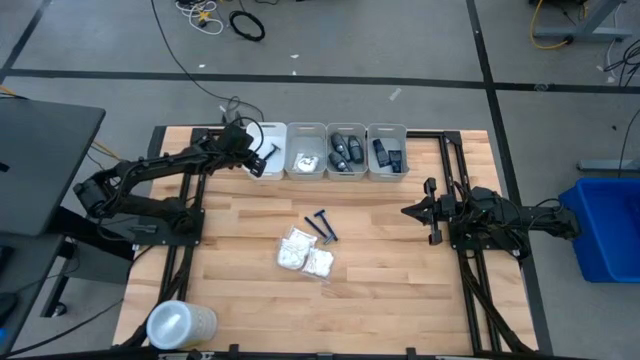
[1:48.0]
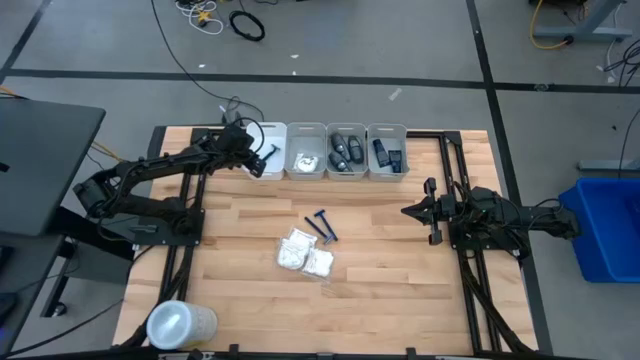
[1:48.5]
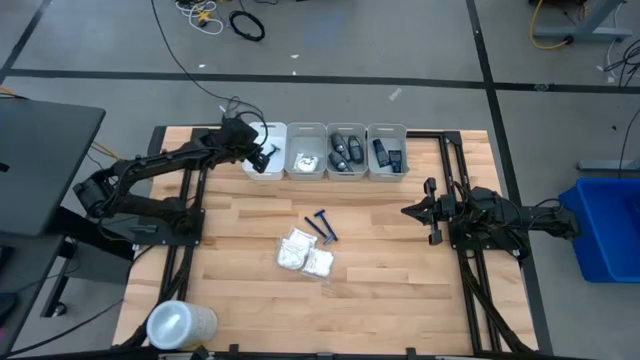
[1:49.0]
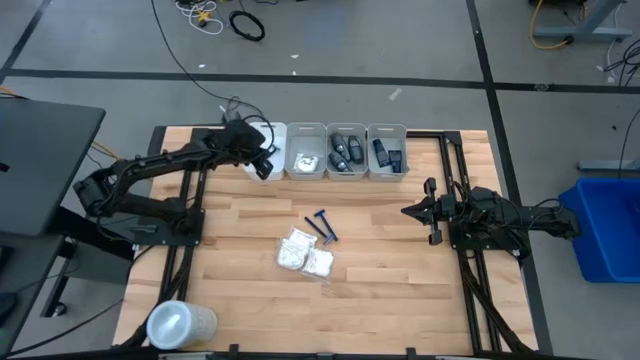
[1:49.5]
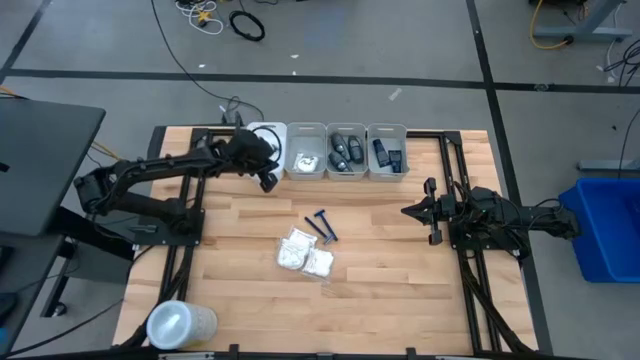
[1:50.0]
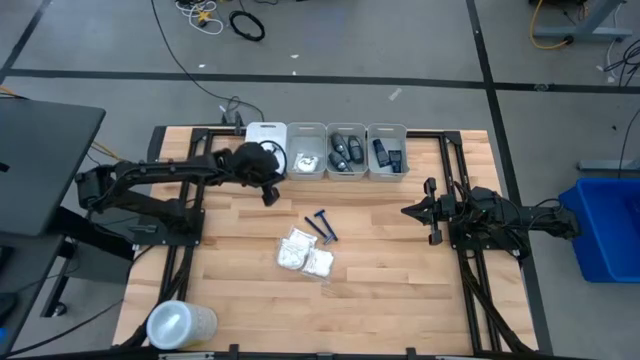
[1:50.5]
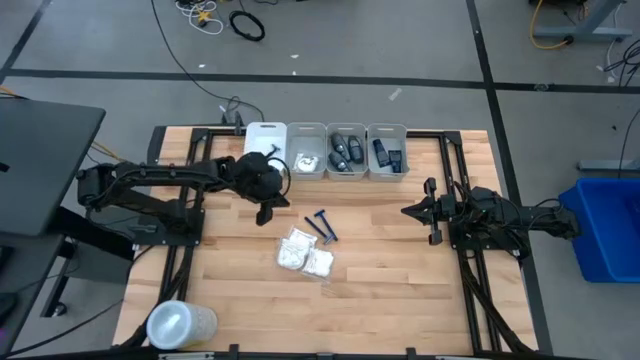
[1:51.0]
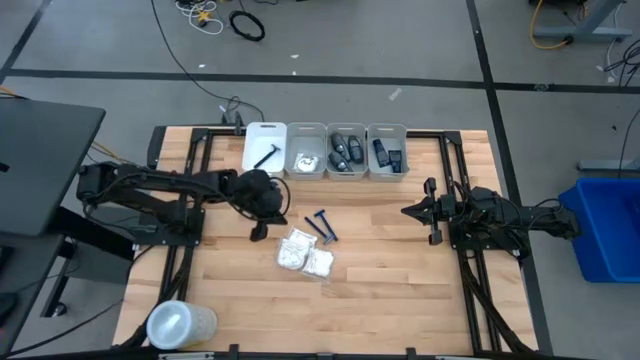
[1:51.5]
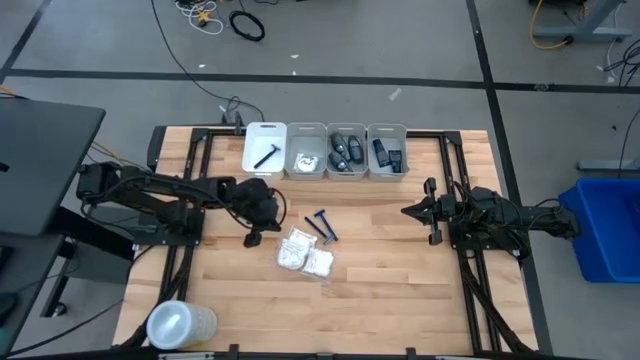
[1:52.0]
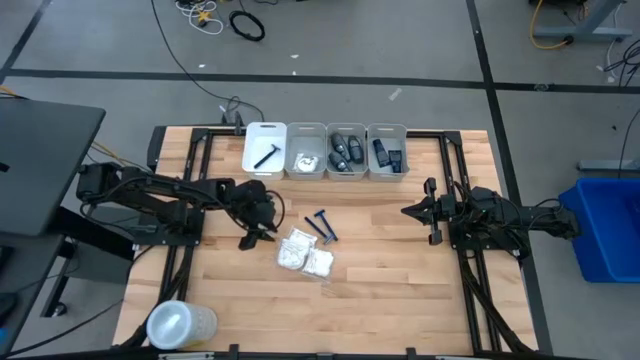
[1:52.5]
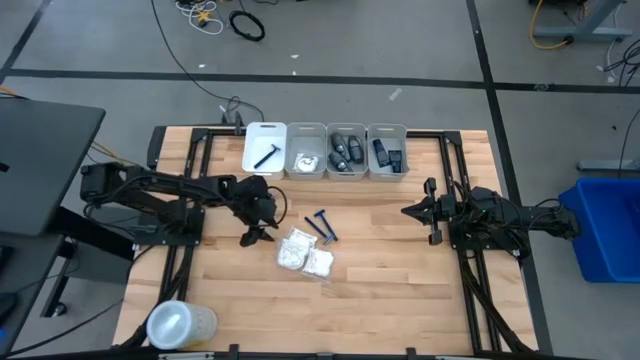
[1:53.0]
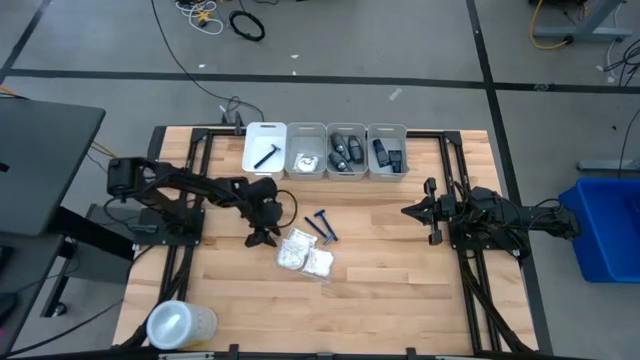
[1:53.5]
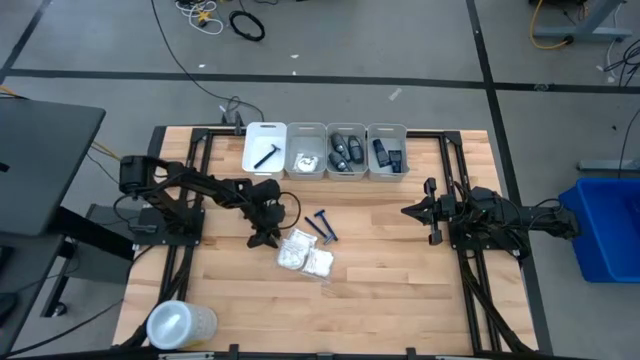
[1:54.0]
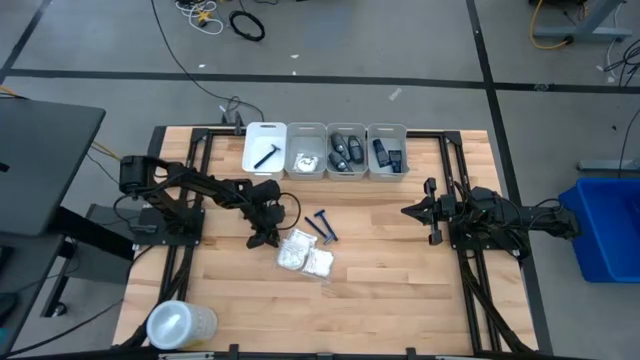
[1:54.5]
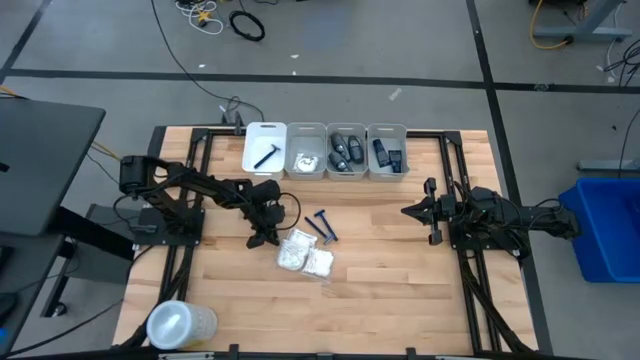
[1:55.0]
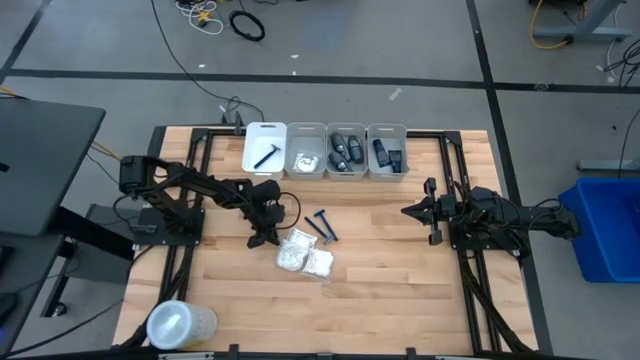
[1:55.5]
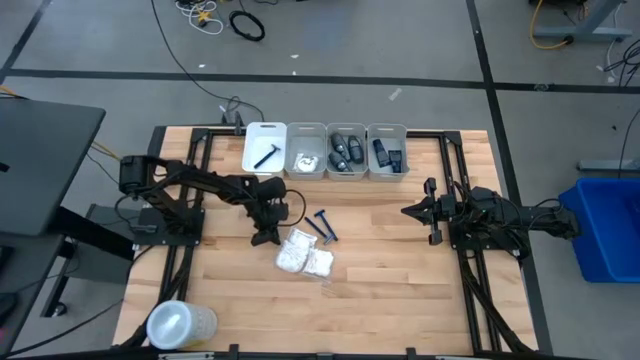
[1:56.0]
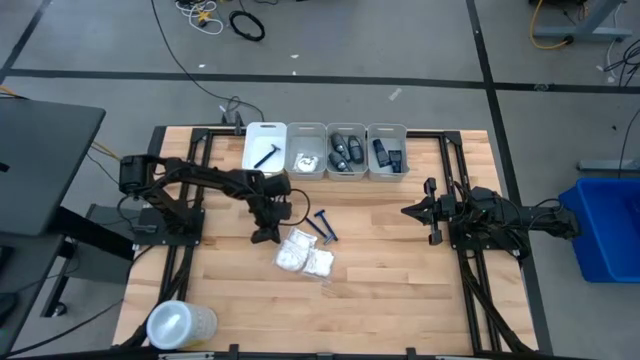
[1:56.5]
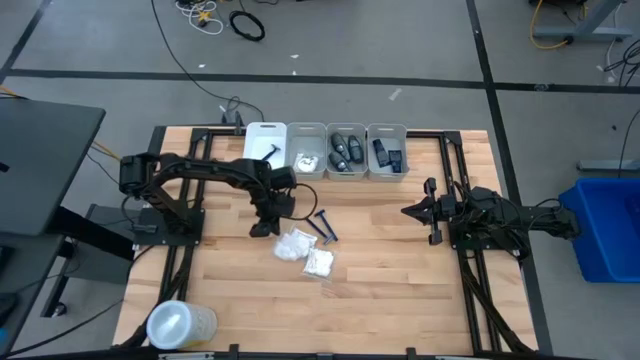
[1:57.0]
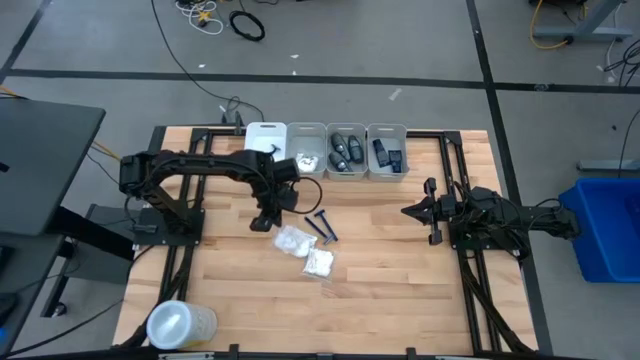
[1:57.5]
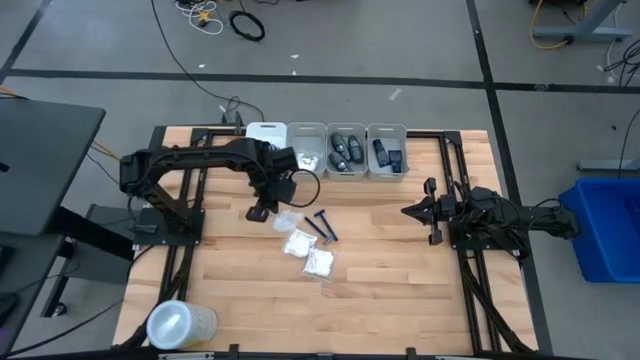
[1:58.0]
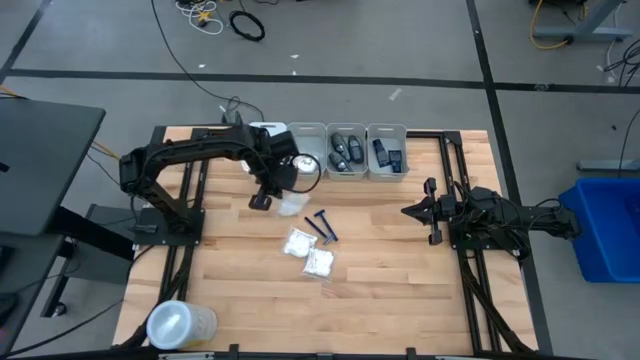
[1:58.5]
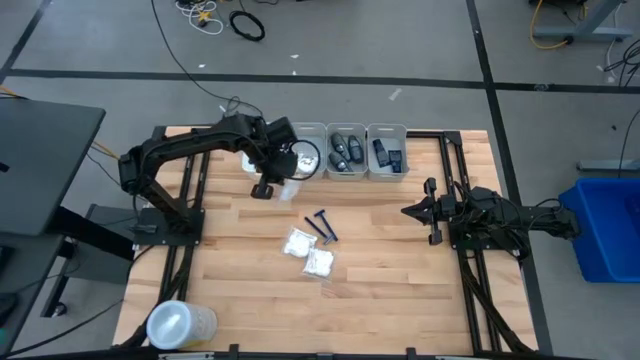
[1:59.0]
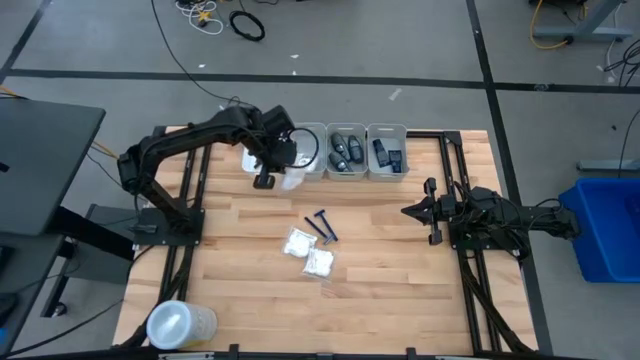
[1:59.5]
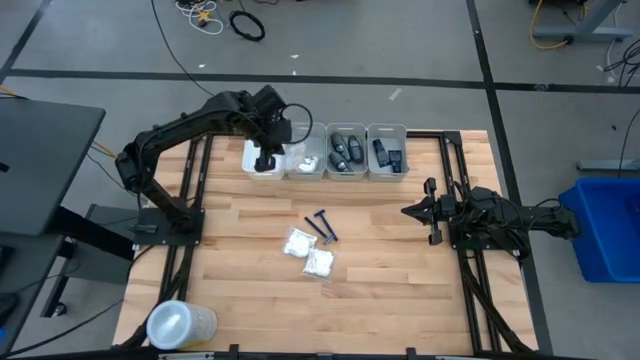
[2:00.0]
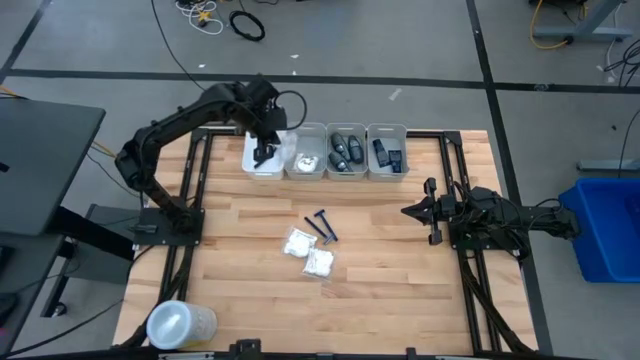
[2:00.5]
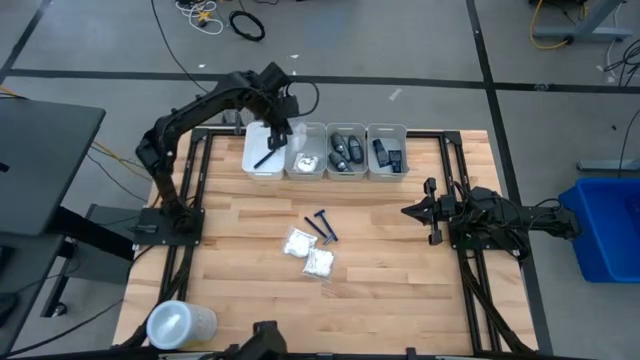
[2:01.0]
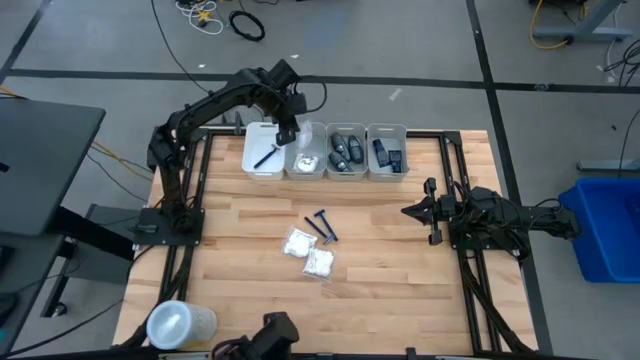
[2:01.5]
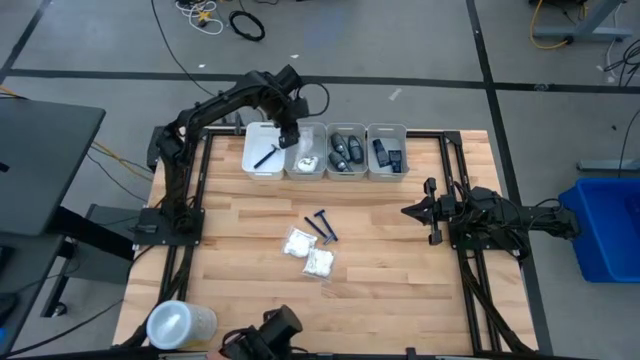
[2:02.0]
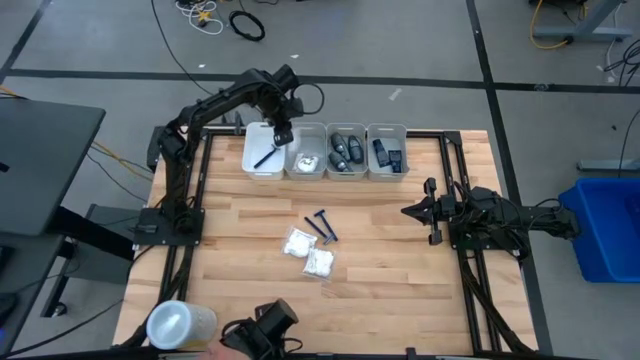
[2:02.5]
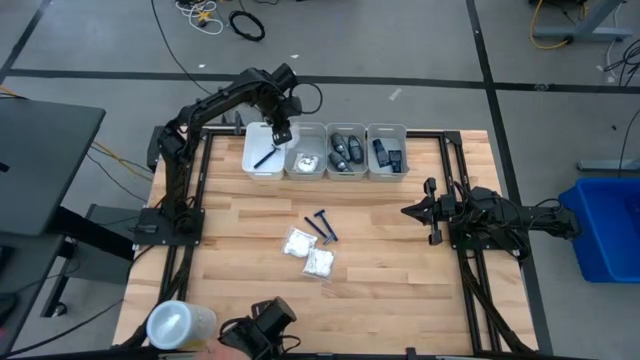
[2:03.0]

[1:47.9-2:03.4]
Task: Pick & Place Travel size toiletries
Put the white cotton pack into the left gray bin

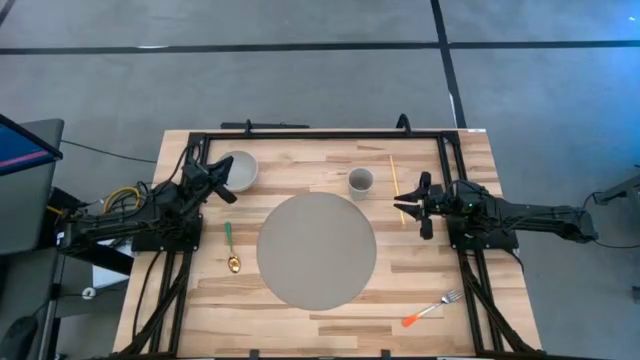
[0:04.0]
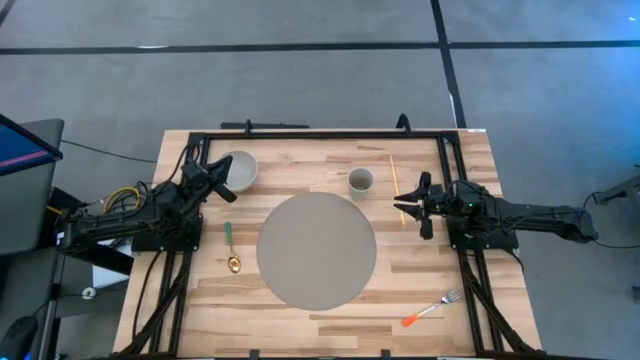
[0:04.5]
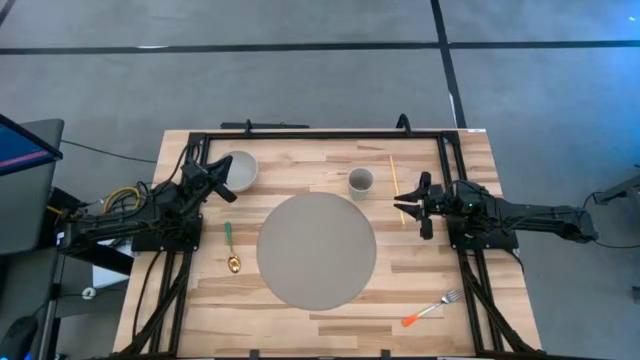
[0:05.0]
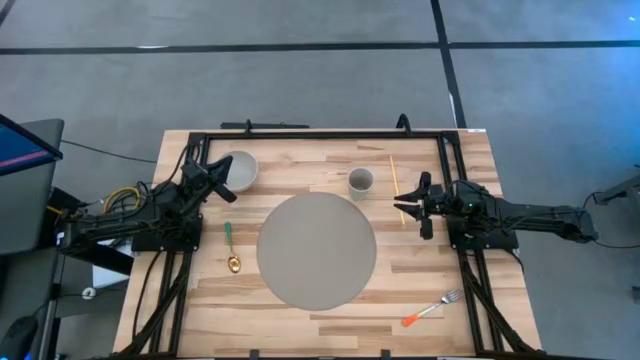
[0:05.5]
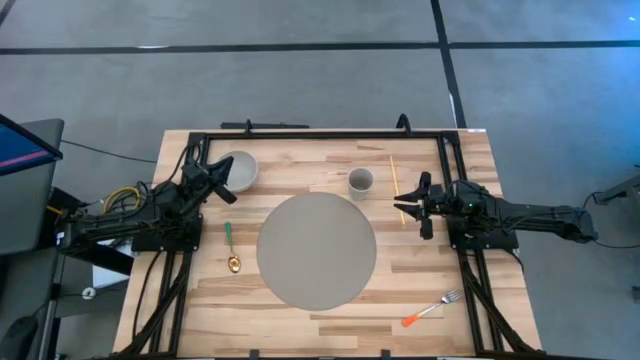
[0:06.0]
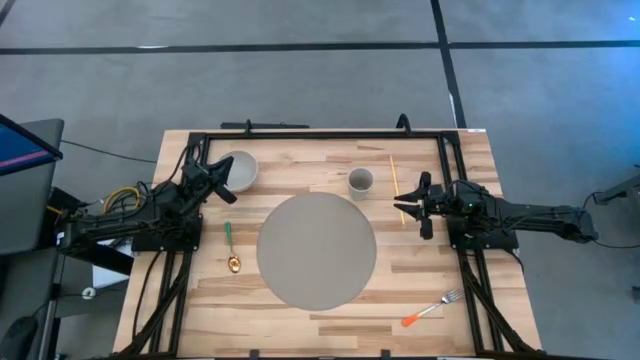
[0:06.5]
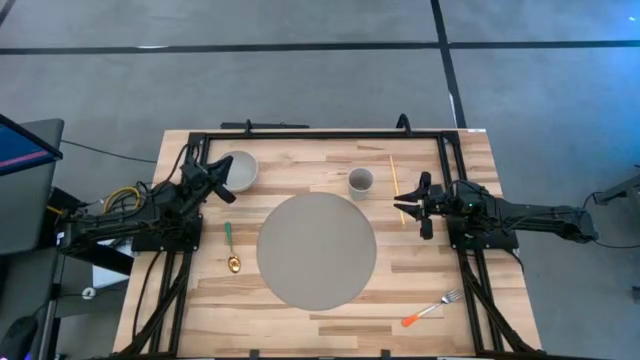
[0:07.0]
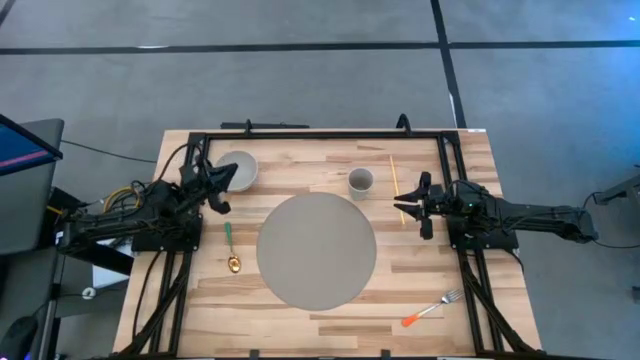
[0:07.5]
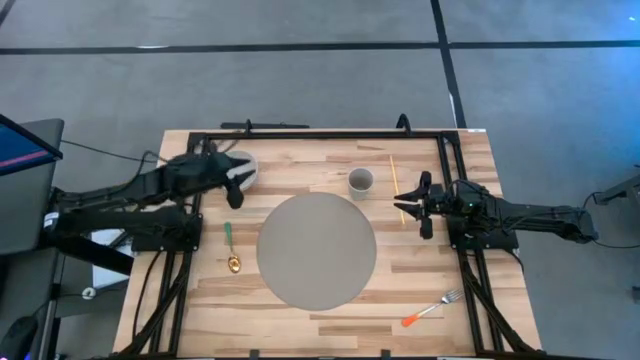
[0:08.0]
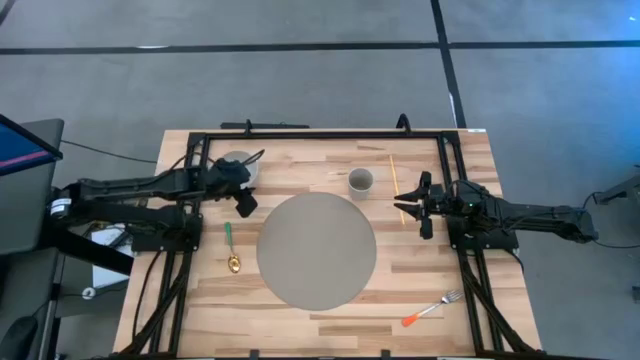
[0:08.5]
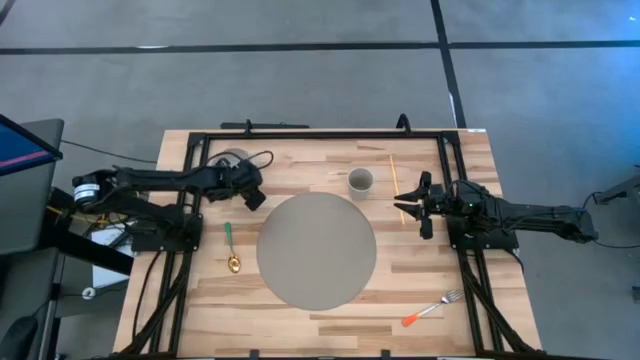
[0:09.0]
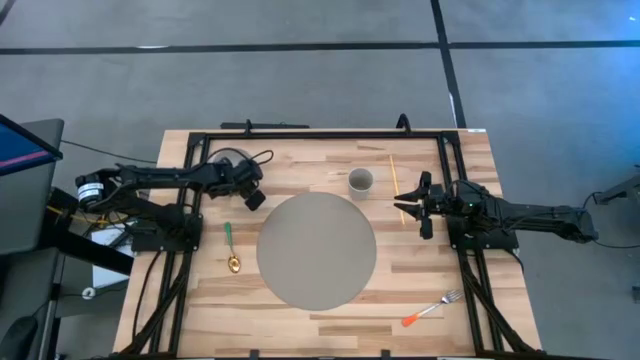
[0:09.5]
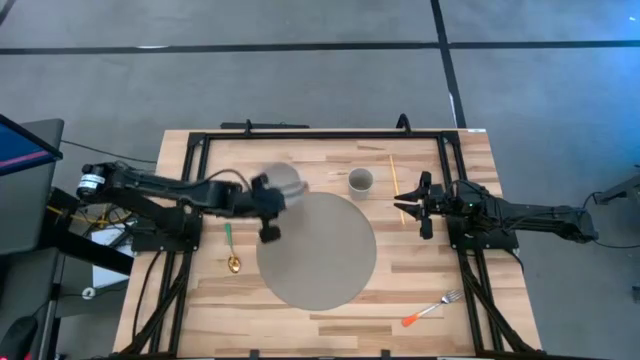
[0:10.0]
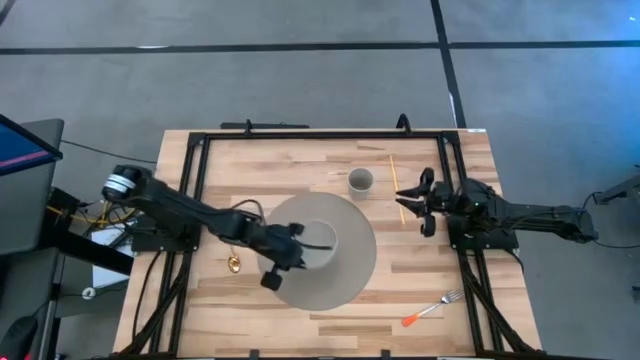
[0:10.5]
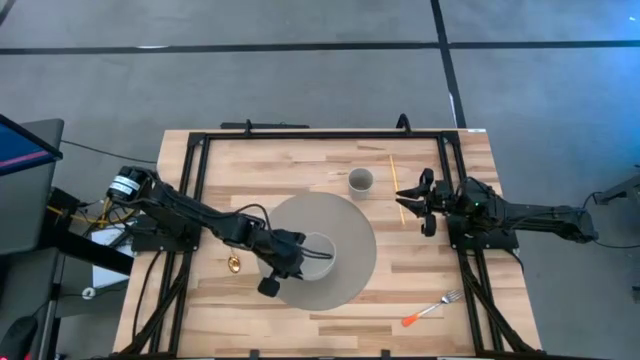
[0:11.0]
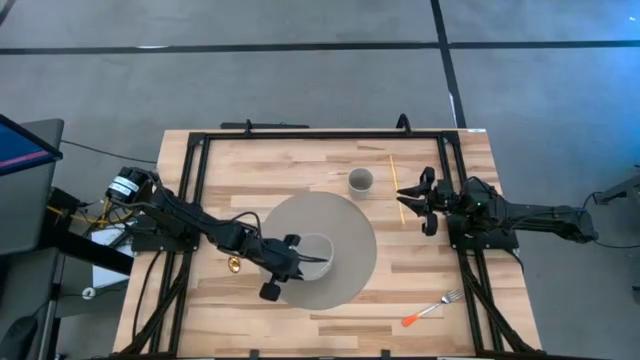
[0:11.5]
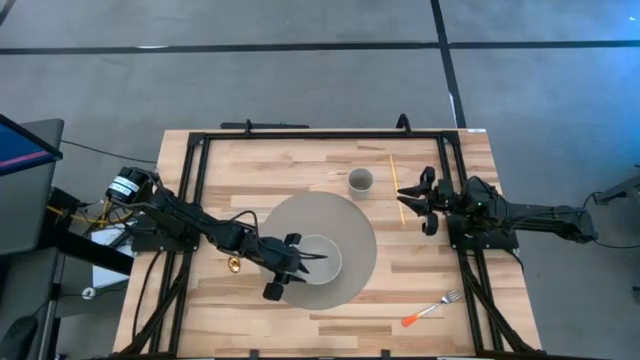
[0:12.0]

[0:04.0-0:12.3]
Task: Pick & Place Utensil
Put the gray bowl on the gray table mat
